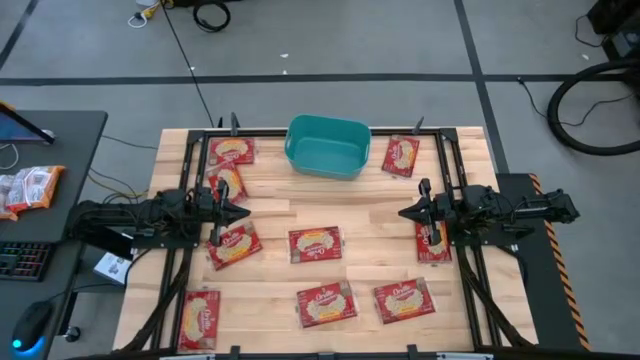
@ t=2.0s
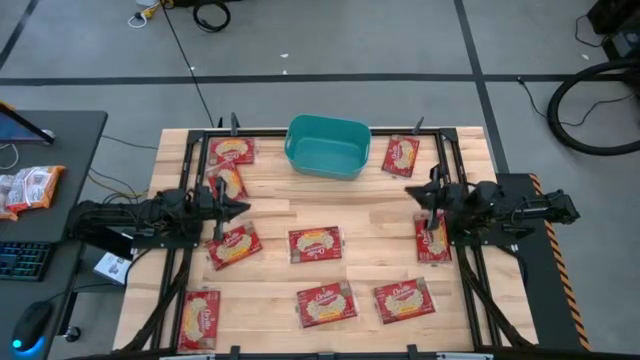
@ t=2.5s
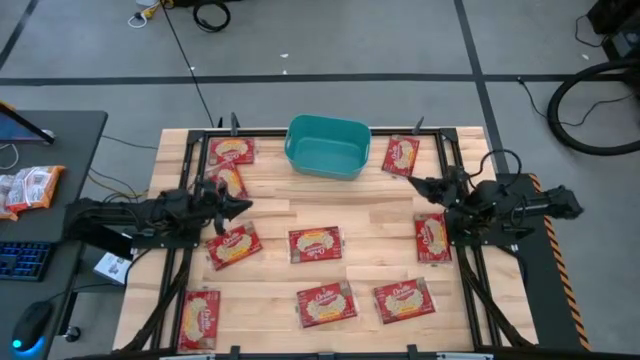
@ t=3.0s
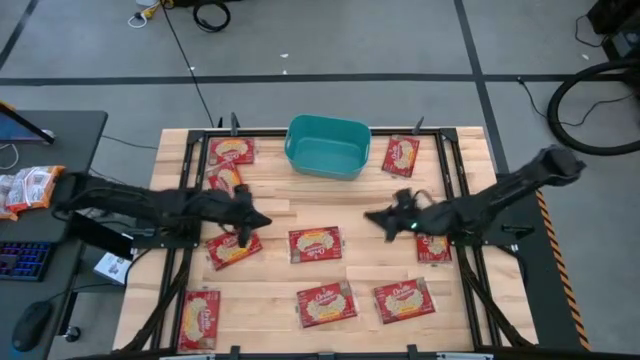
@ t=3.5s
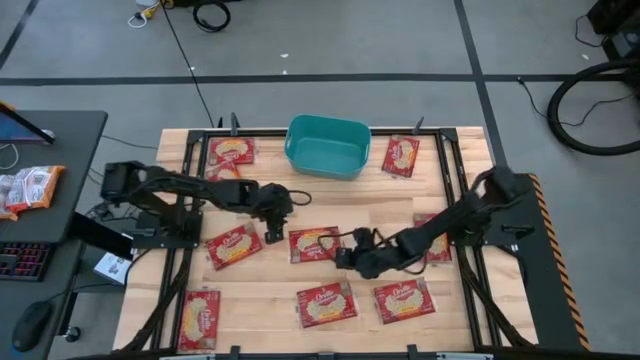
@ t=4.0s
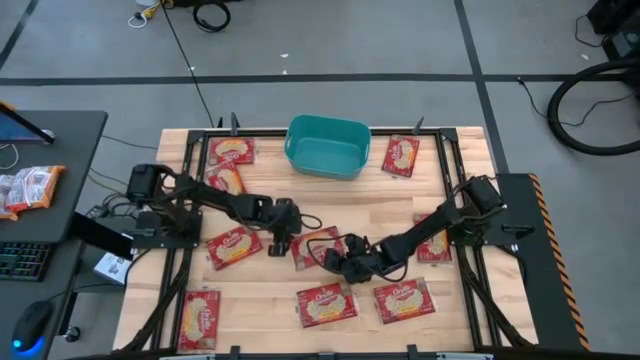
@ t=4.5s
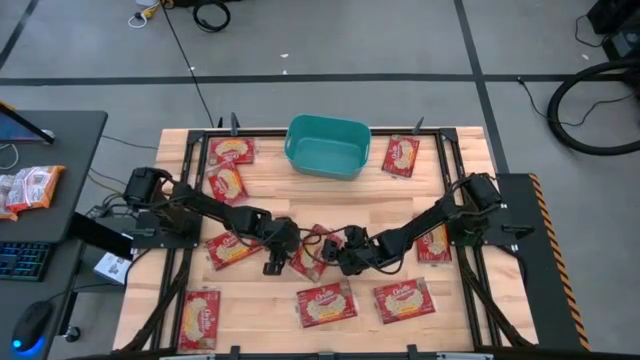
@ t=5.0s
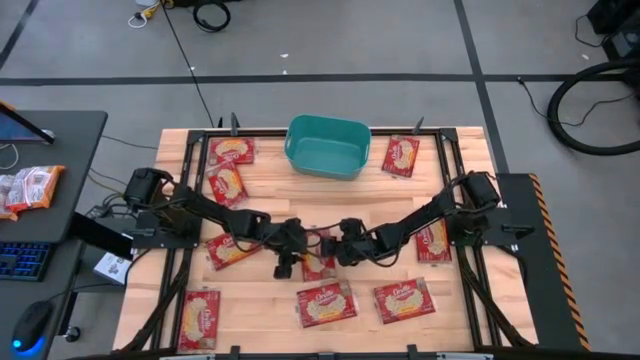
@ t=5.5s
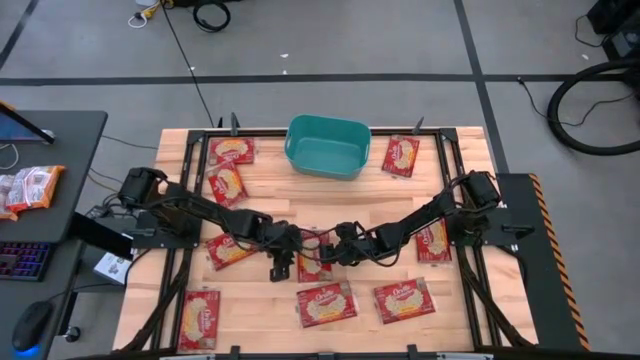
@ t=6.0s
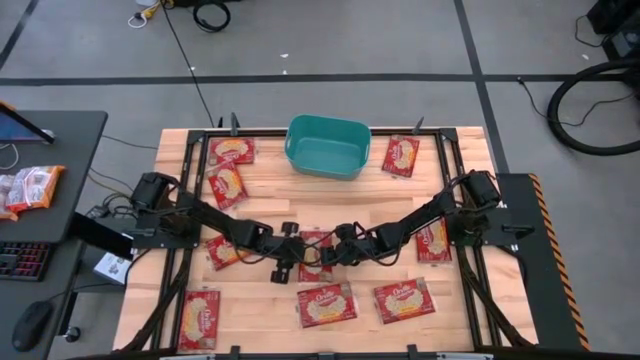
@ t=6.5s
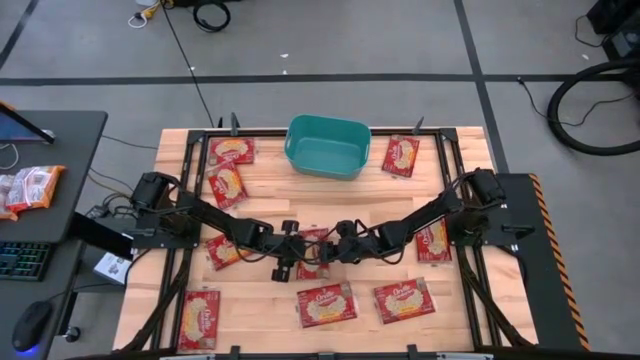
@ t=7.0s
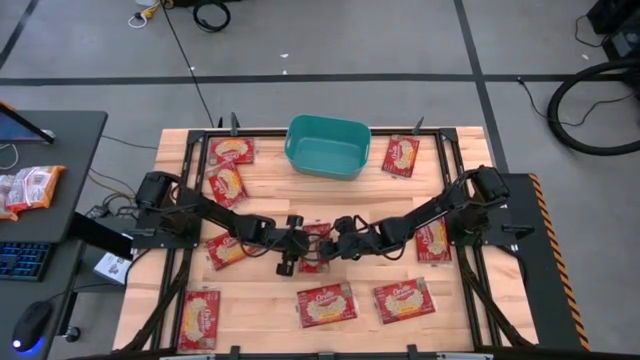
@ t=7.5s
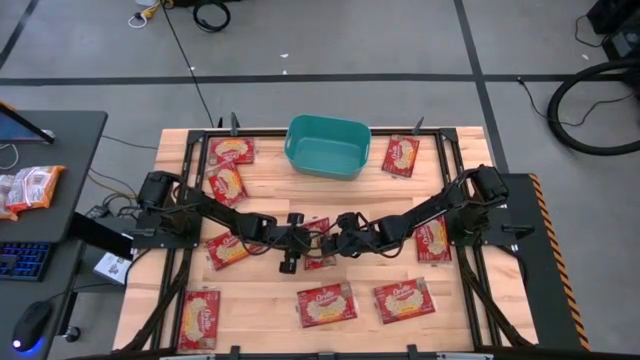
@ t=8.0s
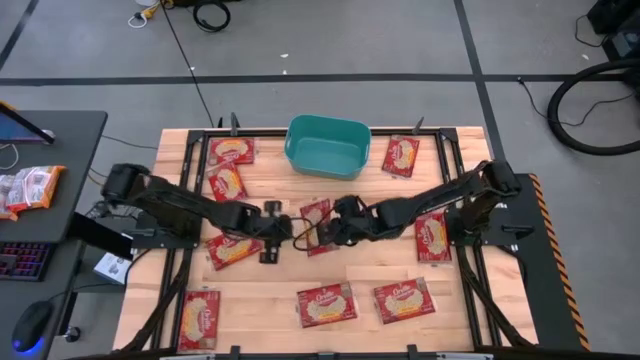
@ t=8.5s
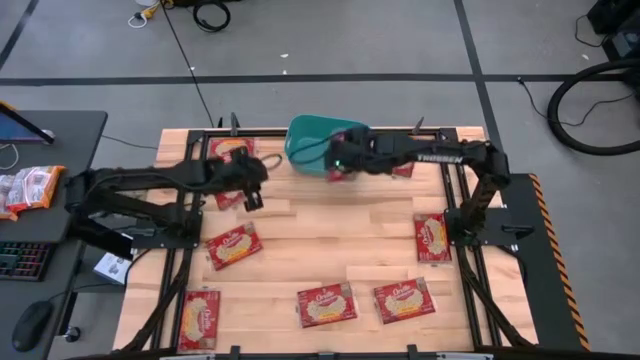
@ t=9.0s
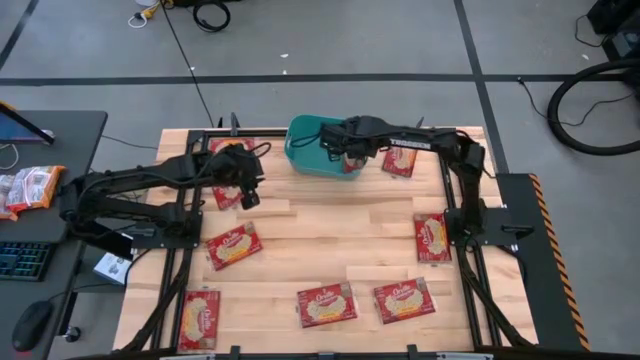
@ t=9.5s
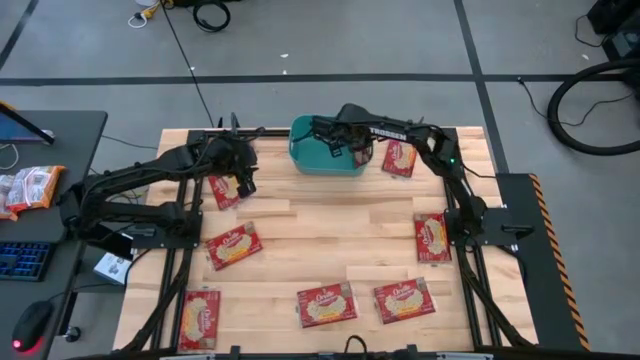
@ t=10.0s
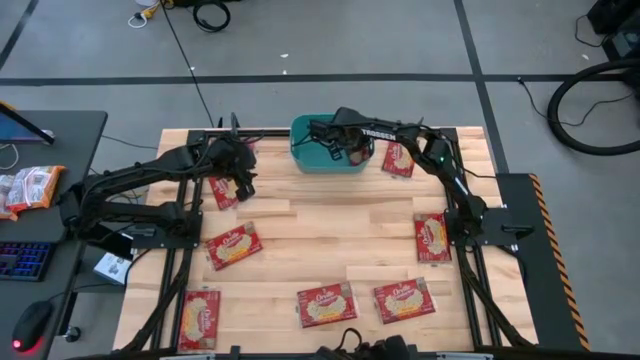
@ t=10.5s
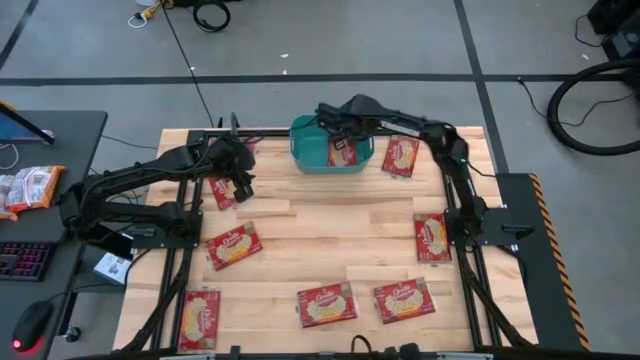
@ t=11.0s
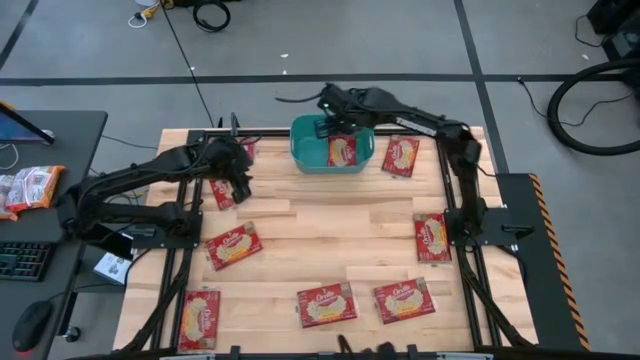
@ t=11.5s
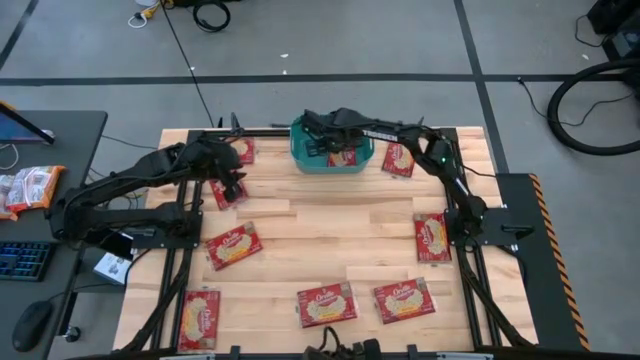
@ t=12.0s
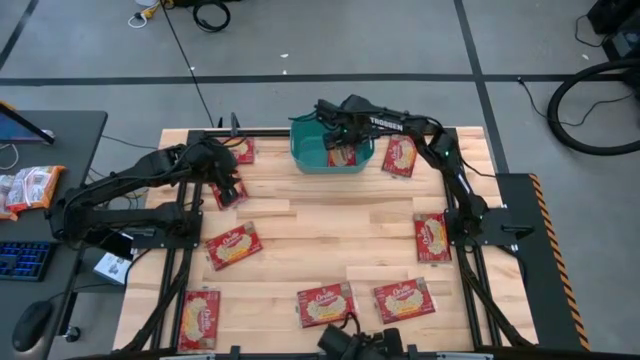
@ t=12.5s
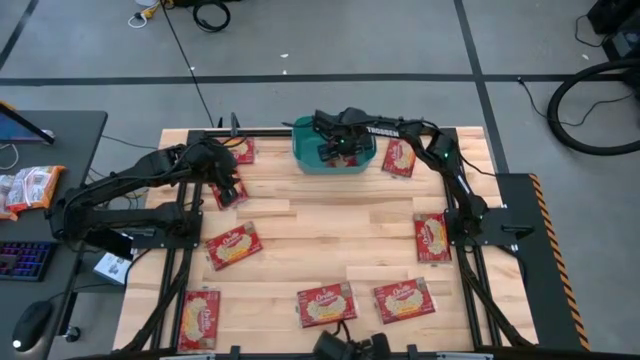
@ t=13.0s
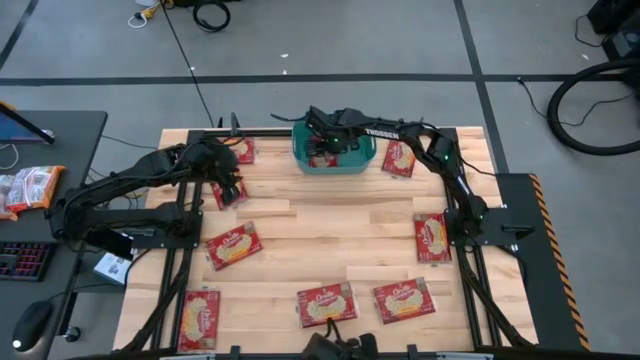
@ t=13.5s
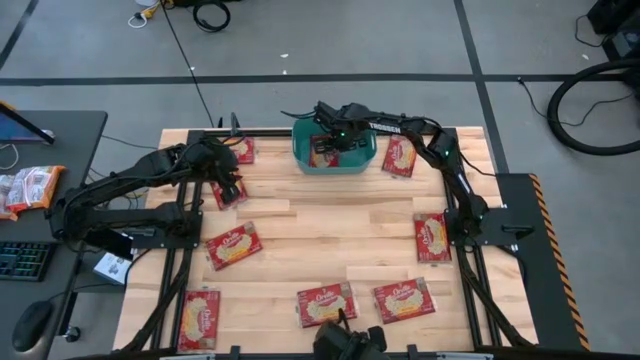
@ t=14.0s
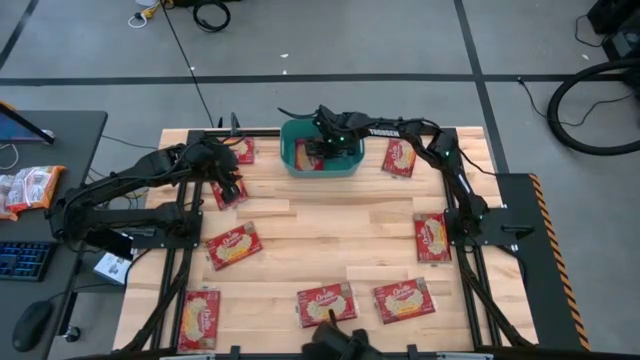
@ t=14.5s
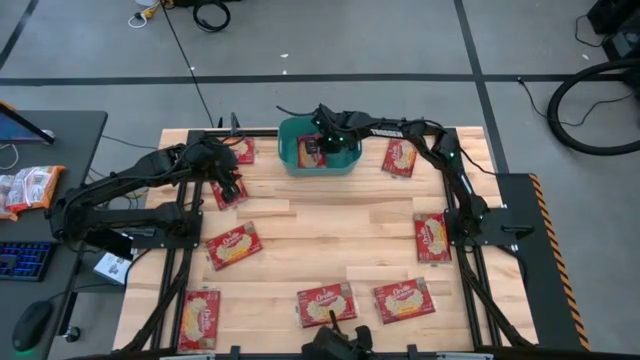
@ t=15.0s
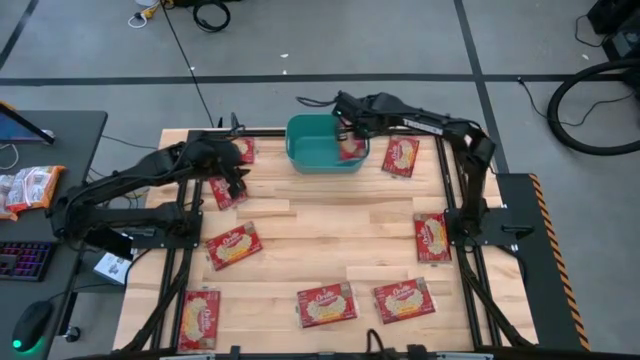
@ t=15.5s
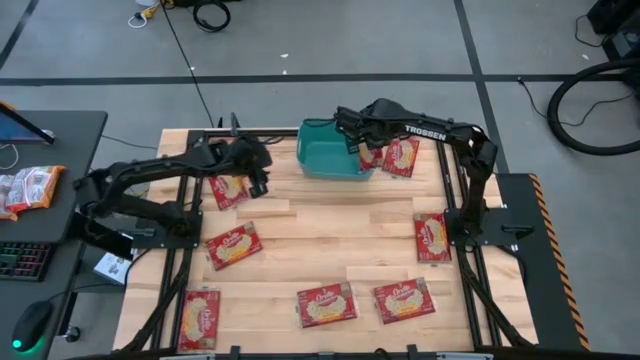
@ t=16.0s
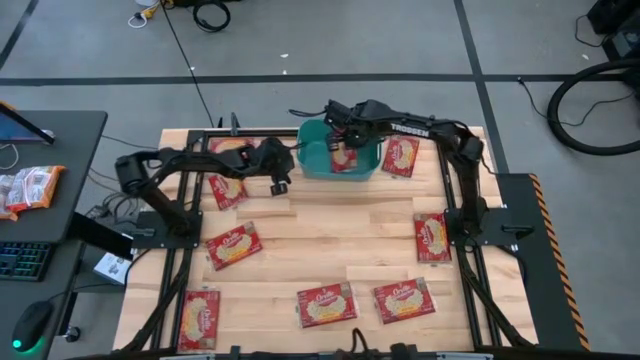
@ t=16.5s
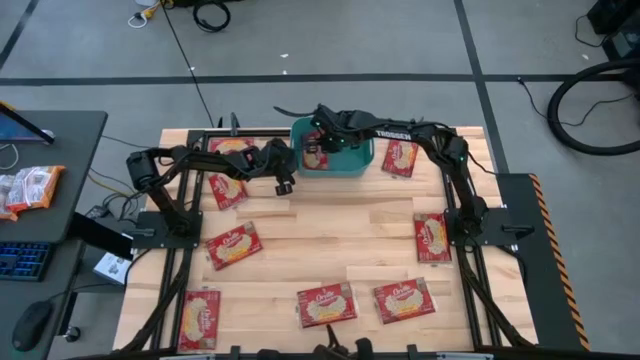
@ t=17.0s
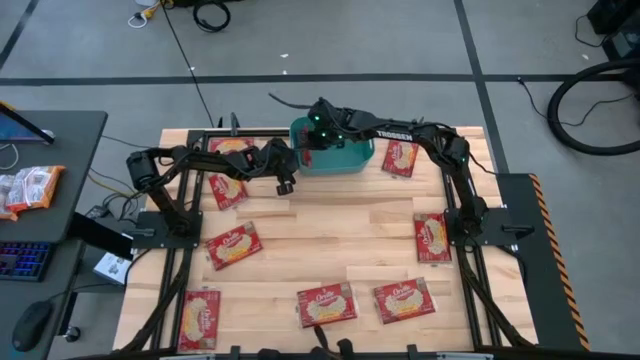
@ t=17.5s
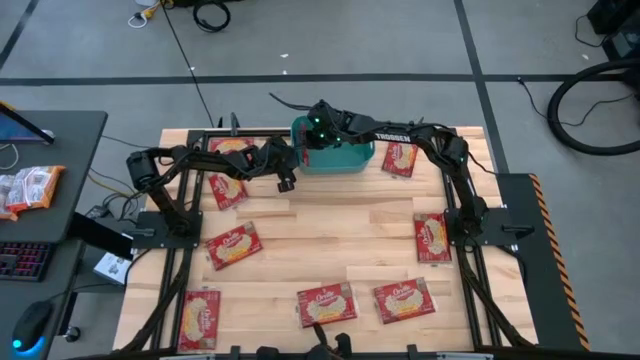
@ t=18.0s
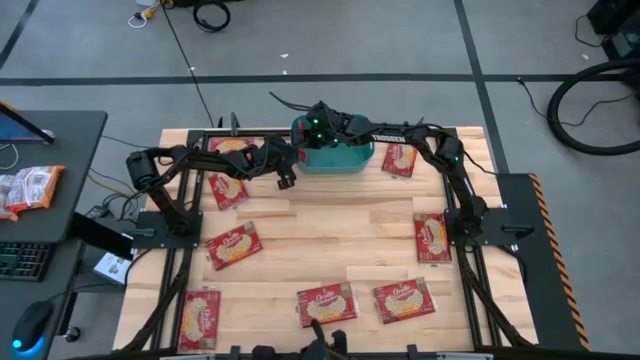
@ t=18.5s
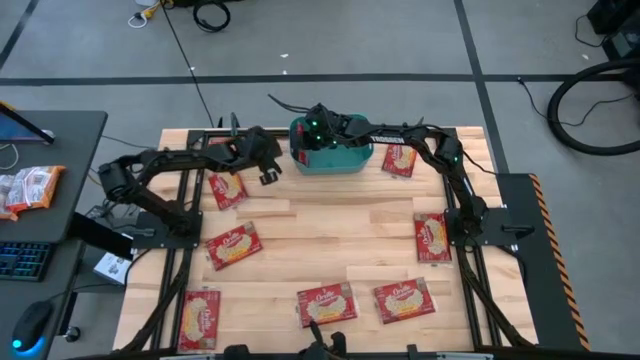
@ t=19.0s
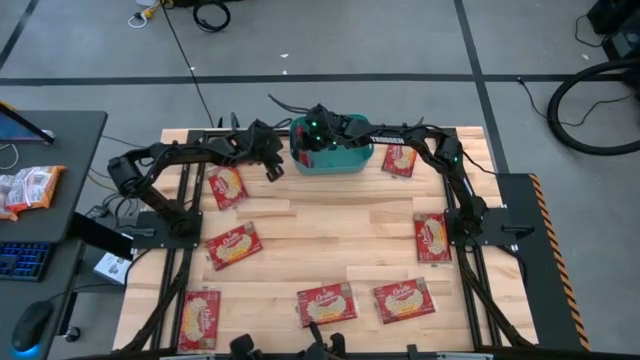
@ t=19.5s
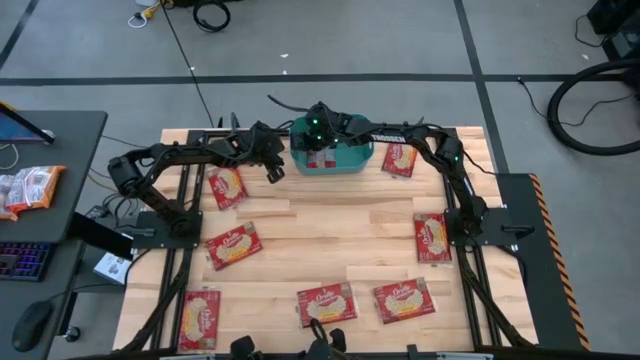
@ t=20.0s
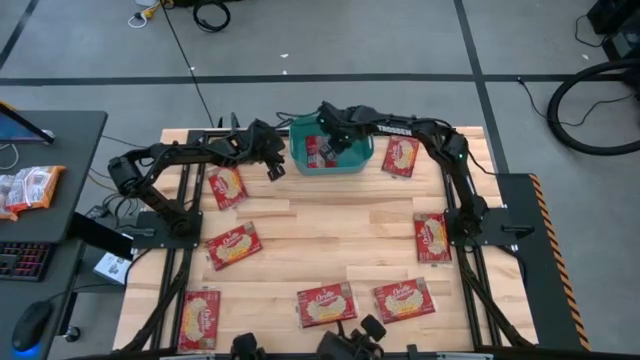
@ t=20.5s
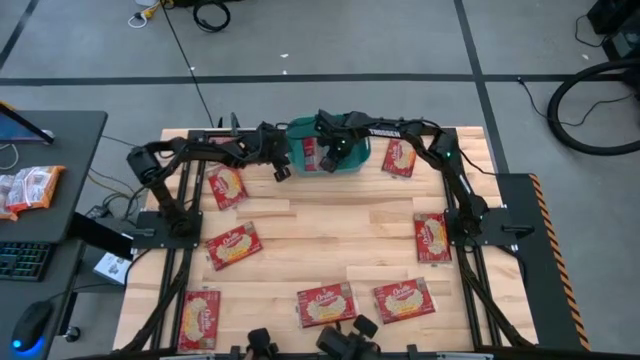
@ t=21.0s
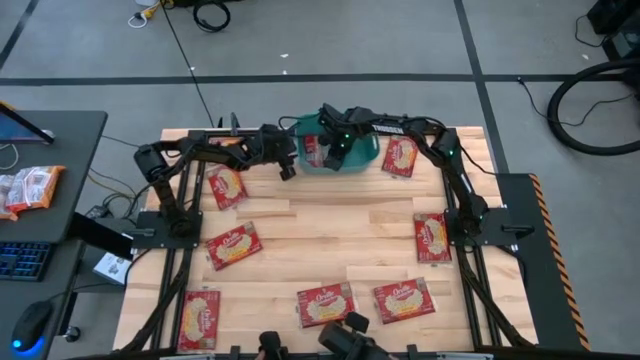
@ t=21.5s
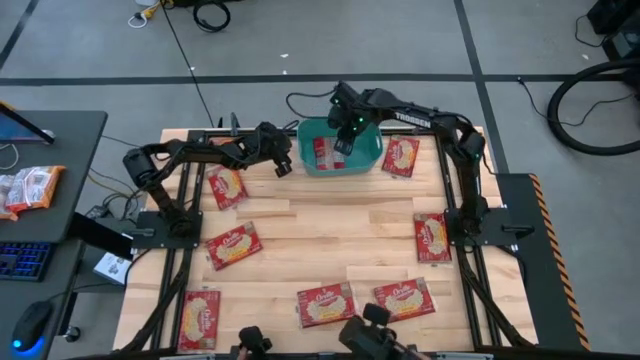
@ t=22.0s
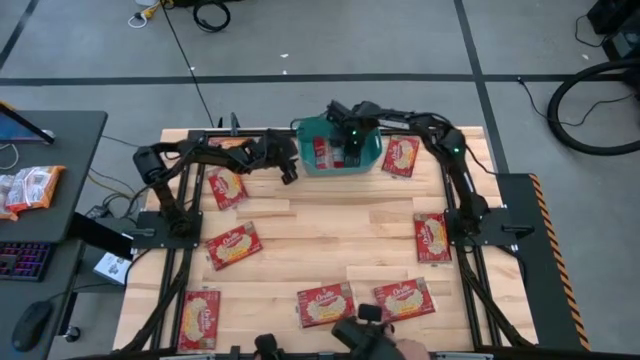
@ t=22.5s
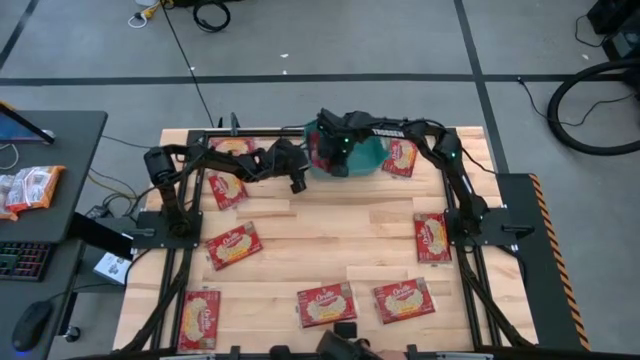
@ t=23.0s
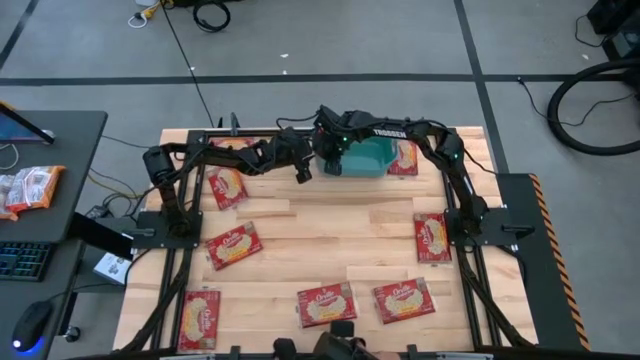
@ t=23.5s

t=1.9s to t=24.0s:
Task: Sort popcorn bags into baskets
Put the popcorn bag into the bin

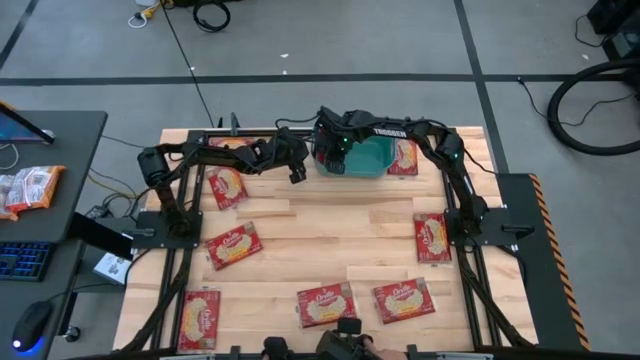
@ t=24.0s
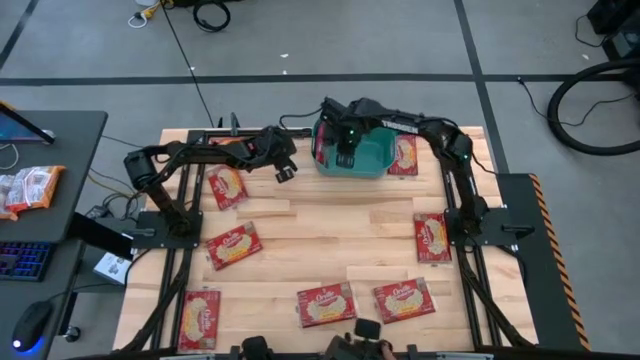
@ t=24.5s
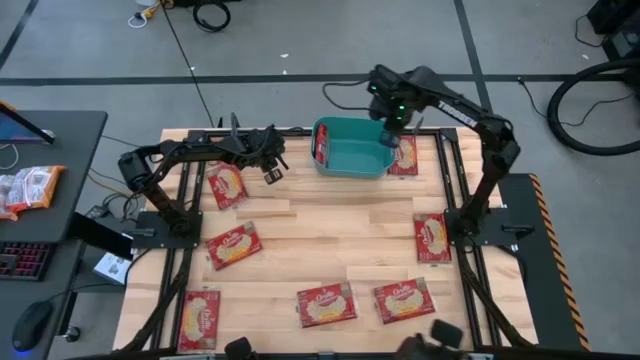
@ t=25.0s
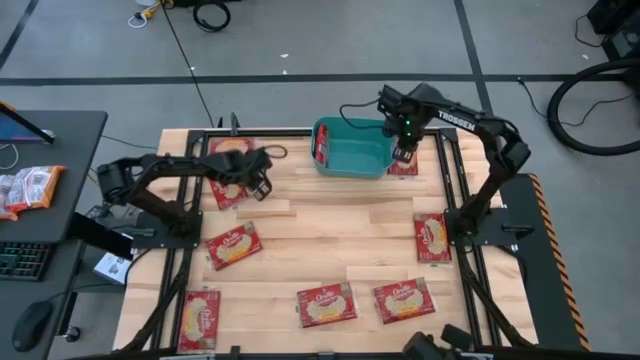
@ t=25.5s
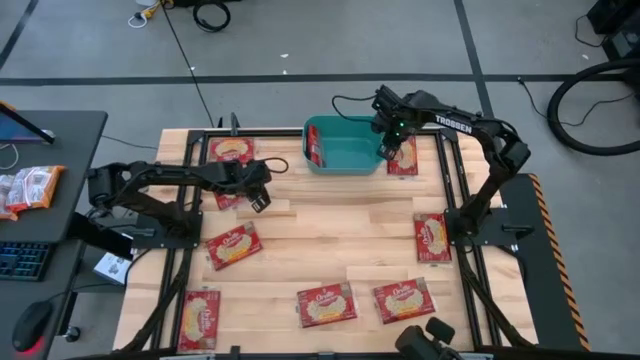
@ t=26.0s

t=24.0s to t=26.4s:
Adjust the bin on the table
